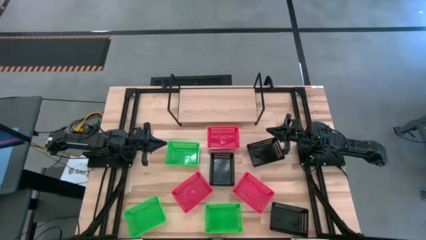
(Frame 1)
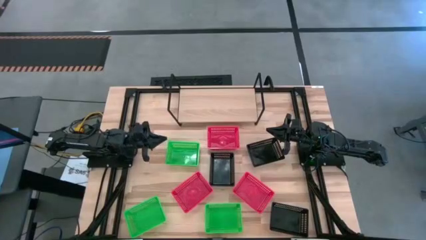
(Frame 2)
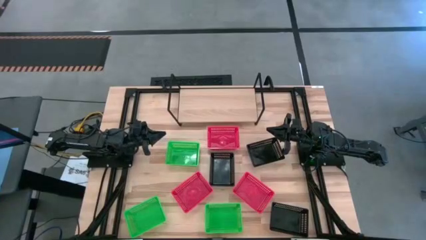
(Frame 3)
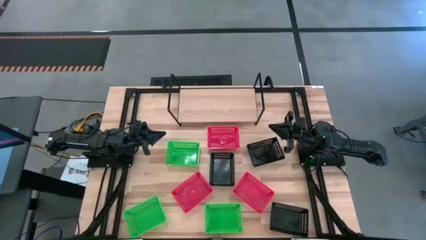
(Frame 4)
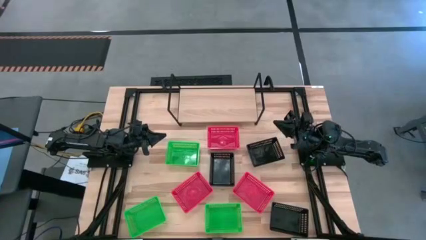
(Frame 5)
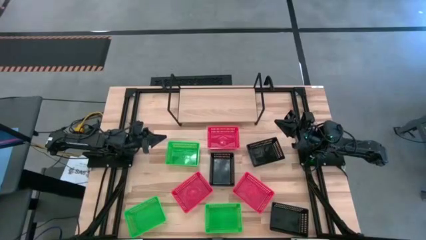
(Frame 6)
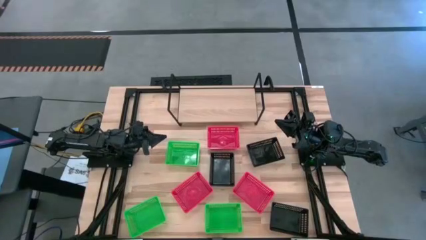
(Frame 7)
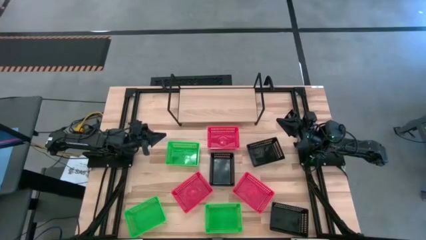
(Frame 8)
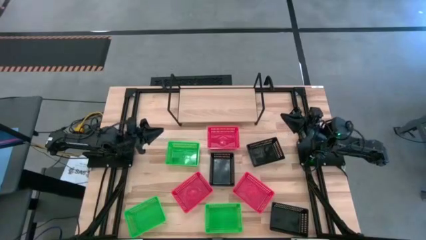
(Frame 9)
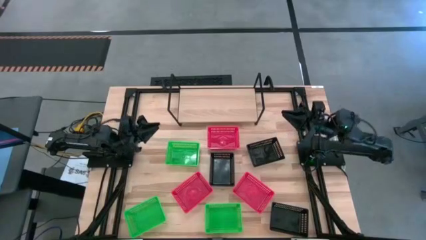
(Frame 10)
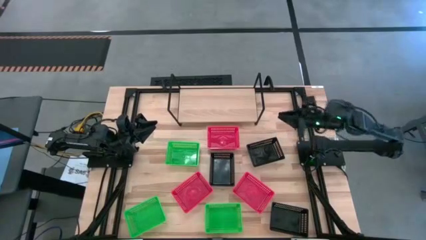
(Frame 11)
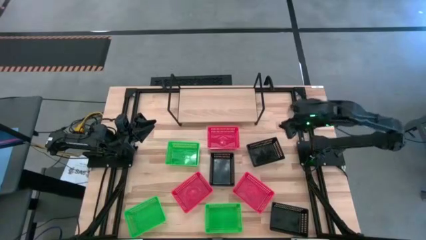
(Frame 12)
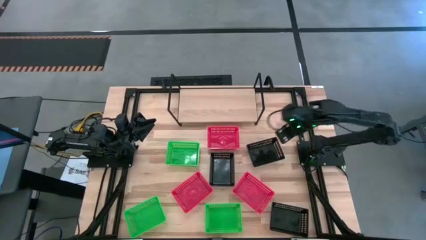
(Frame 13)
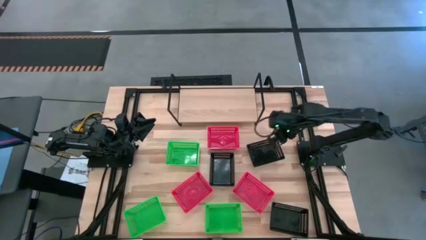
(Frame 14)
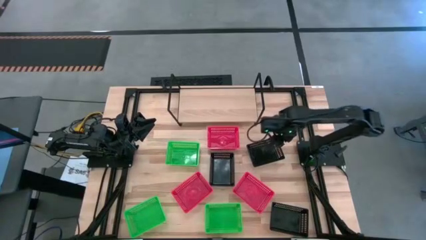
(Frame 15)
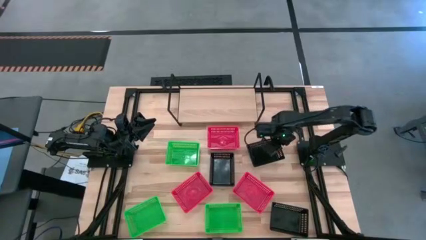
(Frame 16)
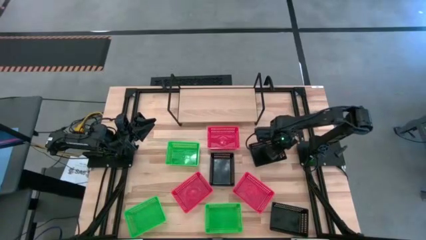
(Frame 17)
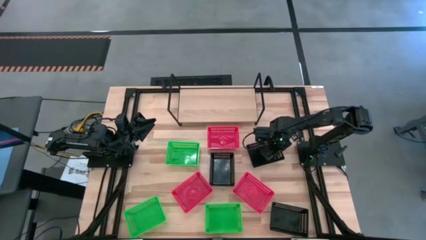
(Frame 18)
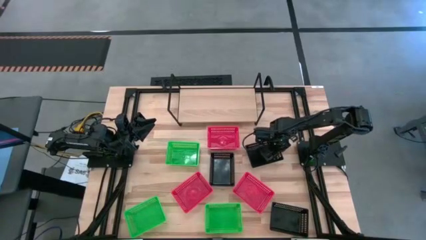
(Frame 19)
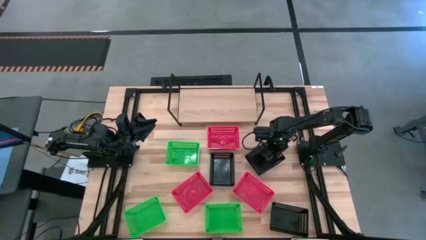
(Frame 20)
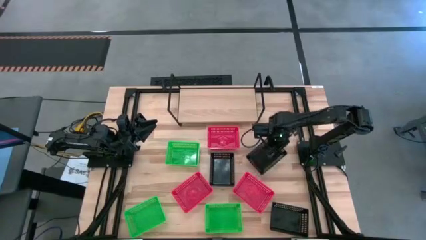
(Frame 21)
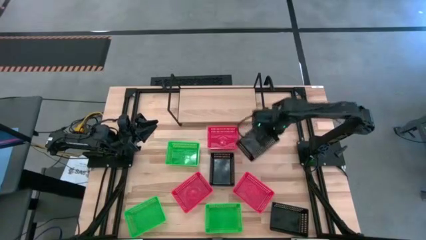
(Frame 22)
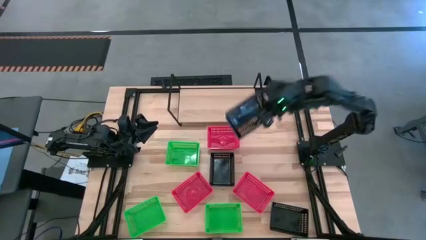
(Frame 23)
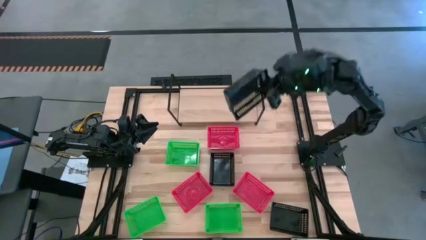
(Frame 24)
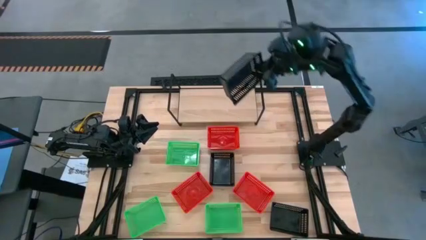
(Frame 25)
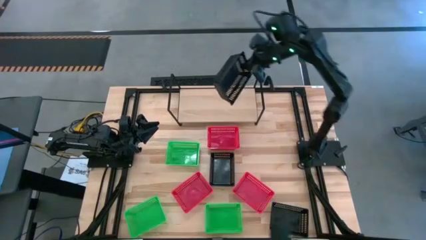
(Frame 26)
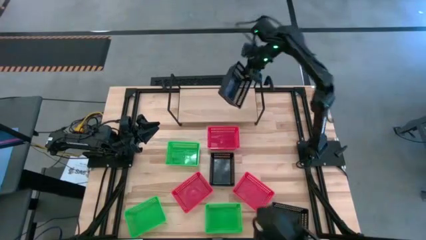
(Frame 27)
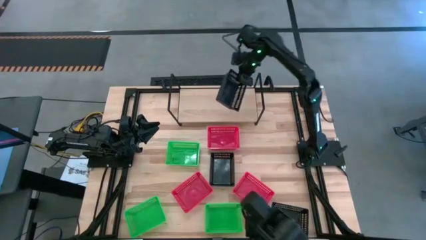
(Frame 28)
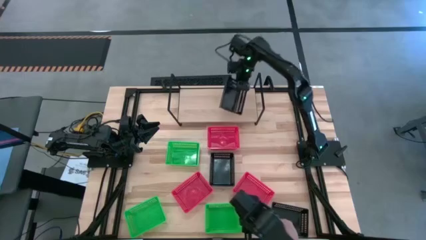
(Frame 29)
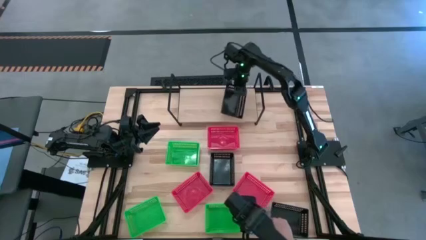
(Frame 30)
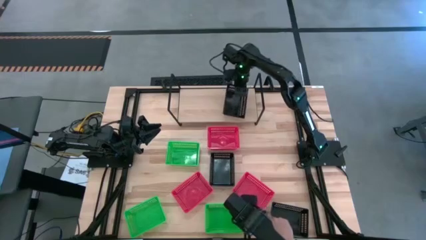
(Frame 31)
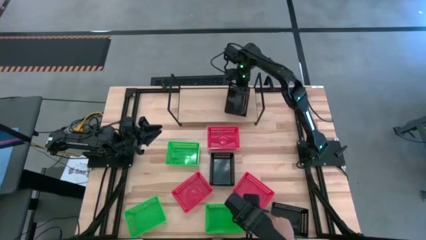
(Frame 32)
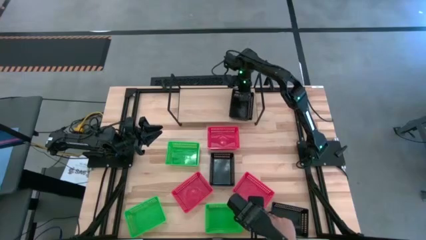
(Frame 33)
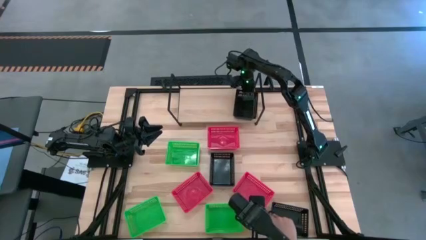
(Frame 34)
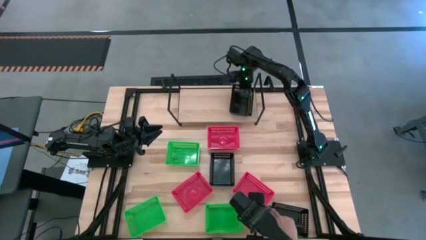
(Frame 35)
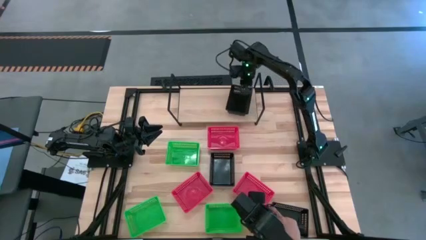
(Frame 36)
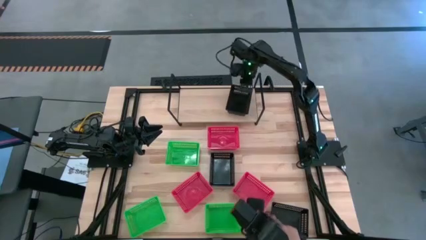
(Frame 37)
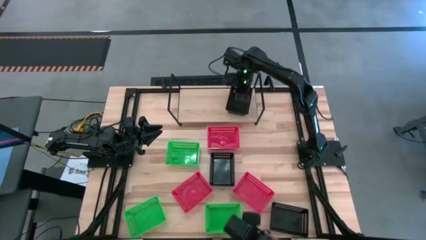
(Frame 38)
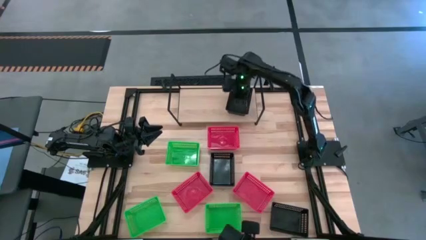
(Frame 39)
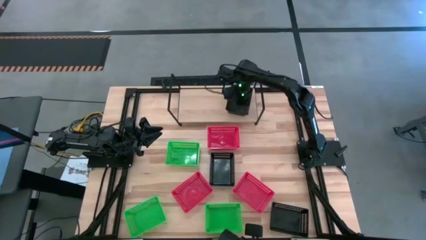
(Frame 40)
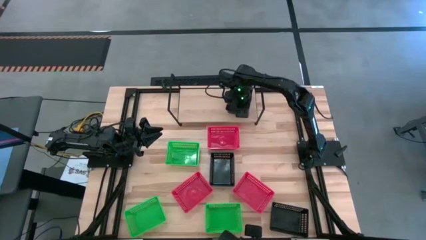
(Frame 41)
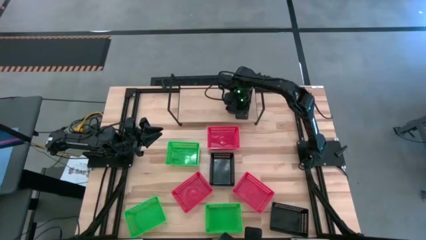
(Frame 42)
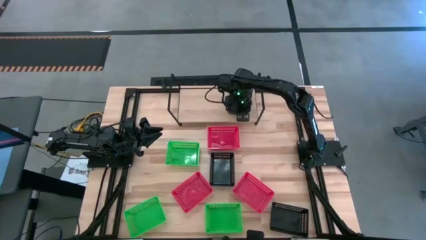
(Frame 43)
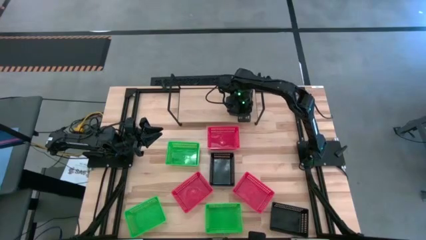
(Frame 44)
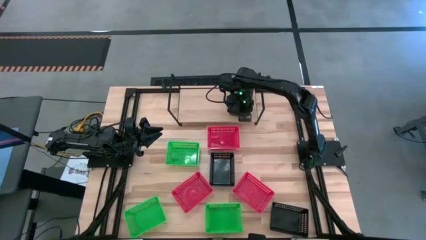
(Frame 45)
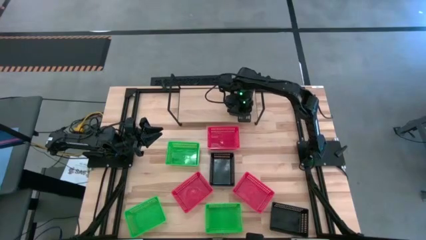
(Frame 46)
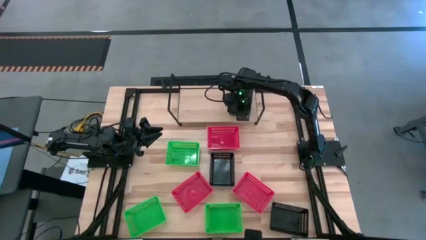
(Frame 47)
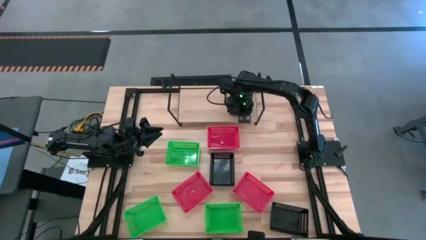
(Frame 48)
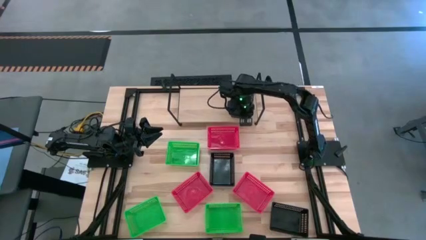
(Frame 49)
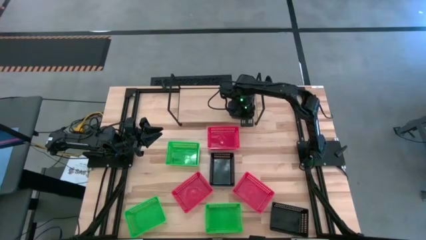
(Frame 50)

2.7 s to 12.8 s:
Task: Stack baskets on shelf by color
Put the top right black bin on the shelf
